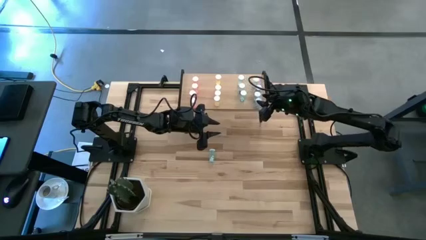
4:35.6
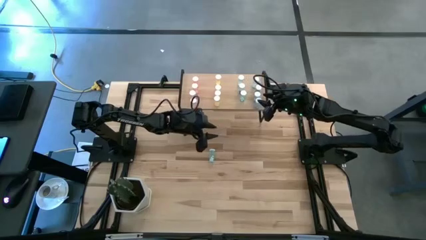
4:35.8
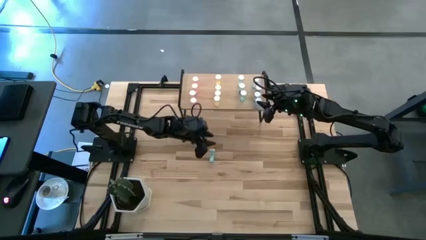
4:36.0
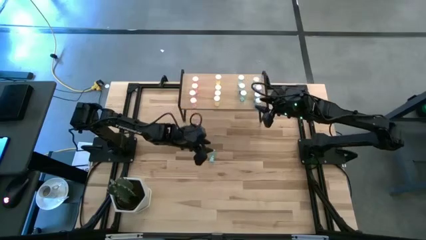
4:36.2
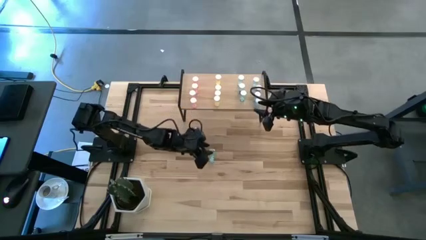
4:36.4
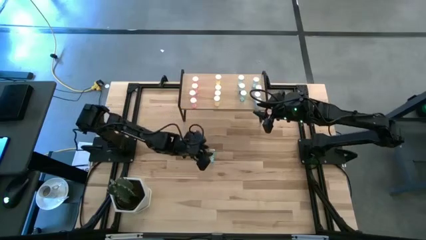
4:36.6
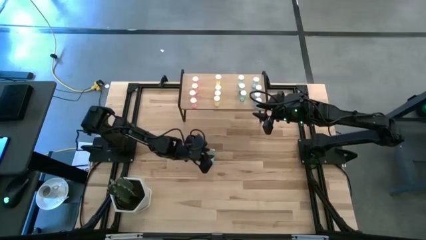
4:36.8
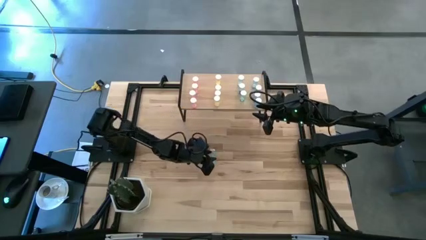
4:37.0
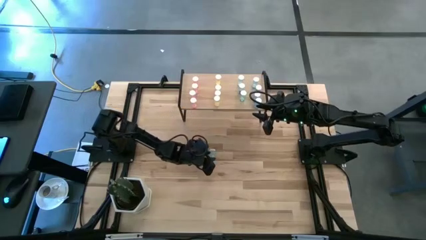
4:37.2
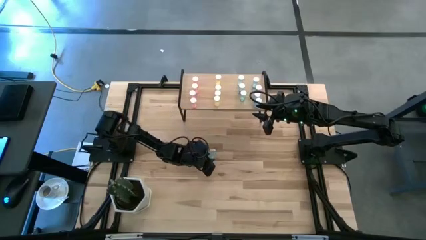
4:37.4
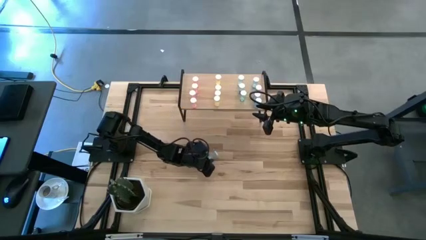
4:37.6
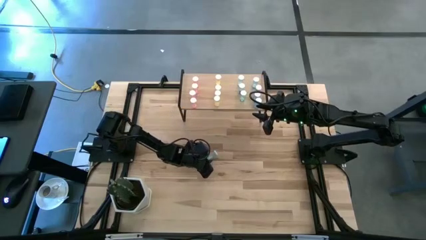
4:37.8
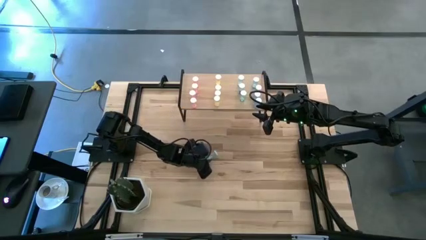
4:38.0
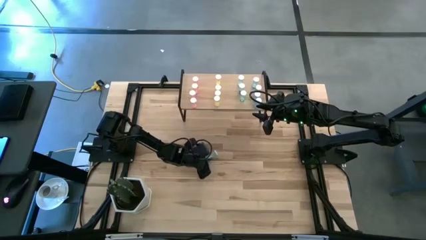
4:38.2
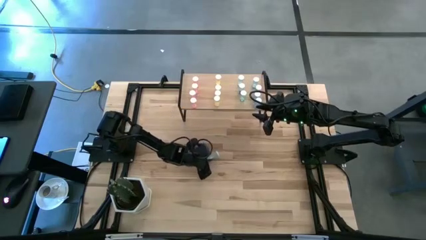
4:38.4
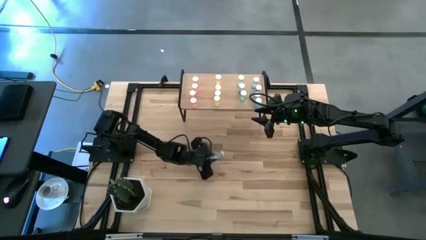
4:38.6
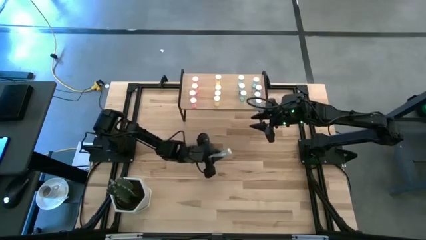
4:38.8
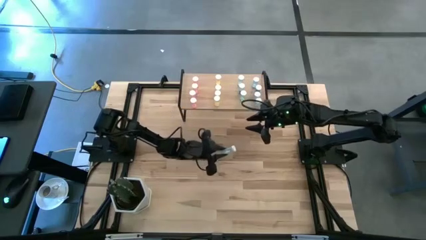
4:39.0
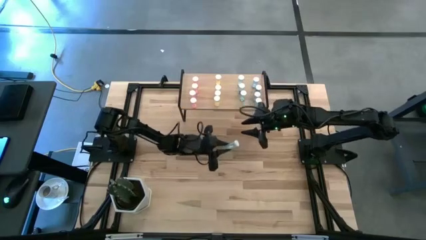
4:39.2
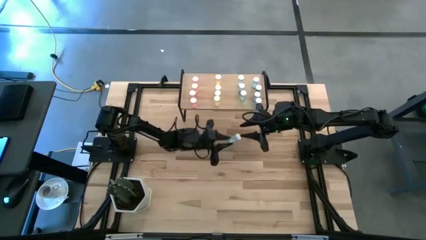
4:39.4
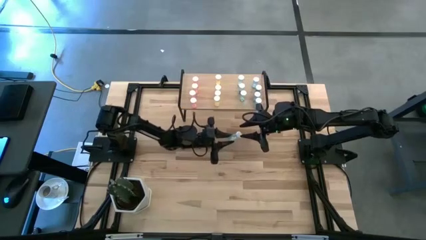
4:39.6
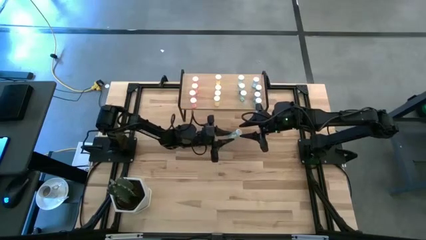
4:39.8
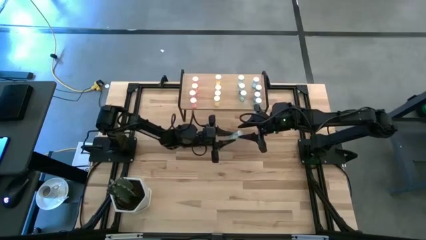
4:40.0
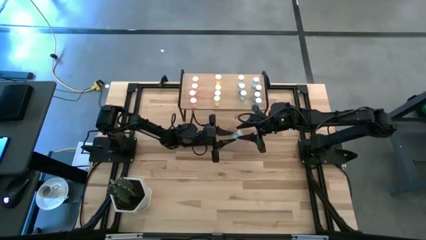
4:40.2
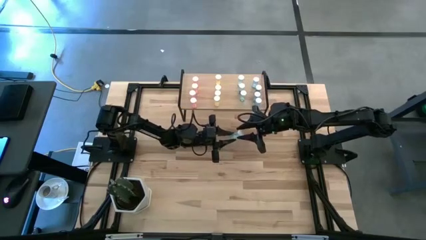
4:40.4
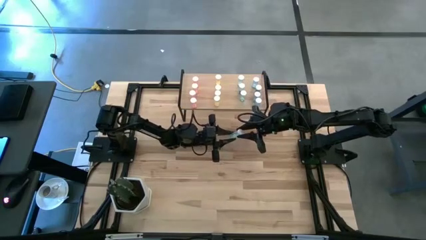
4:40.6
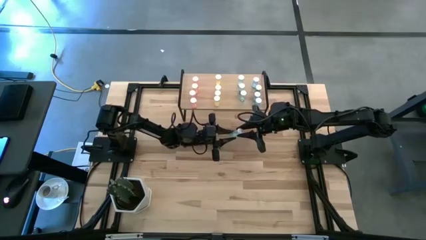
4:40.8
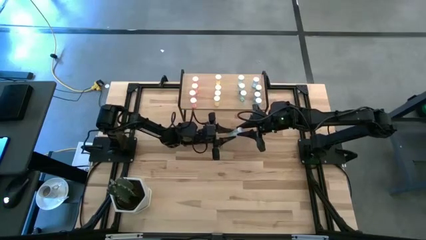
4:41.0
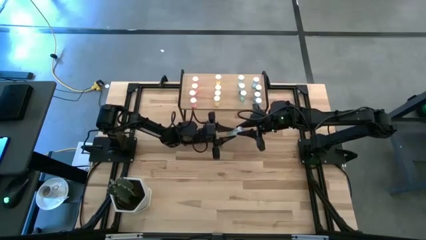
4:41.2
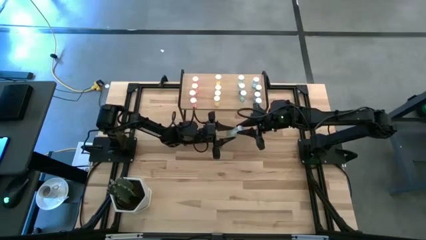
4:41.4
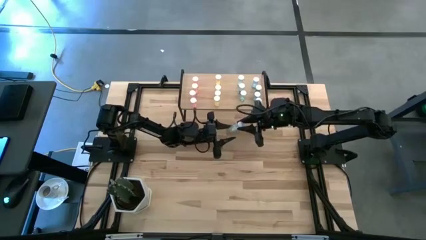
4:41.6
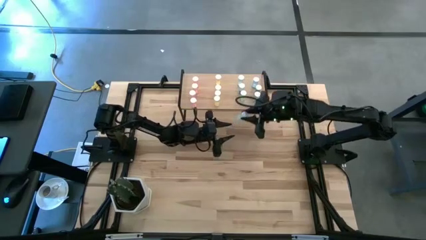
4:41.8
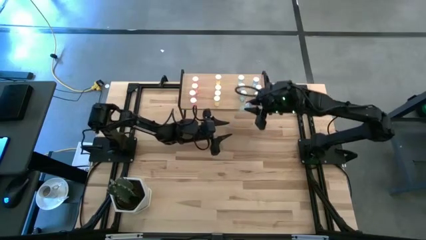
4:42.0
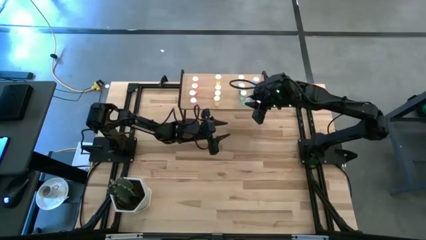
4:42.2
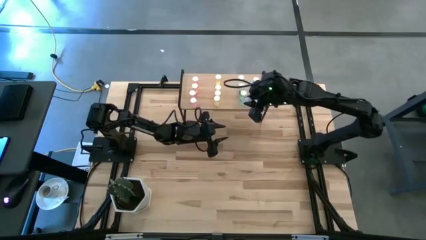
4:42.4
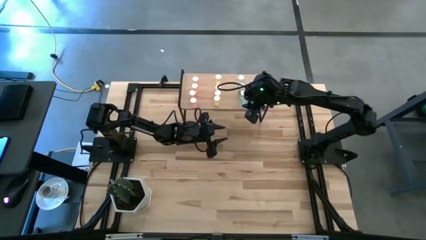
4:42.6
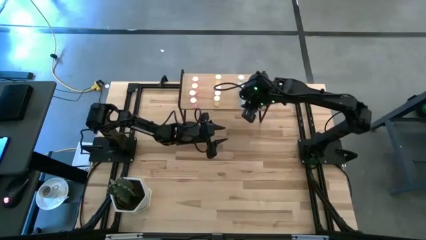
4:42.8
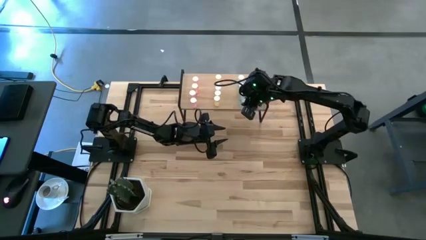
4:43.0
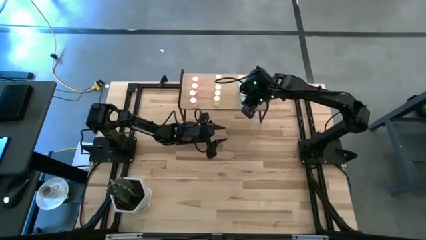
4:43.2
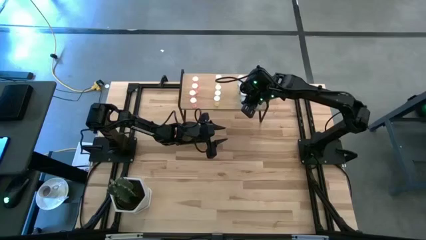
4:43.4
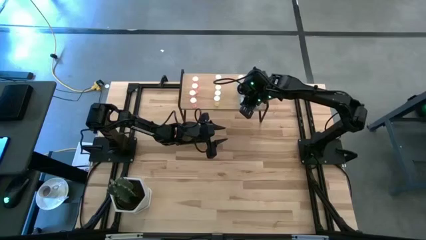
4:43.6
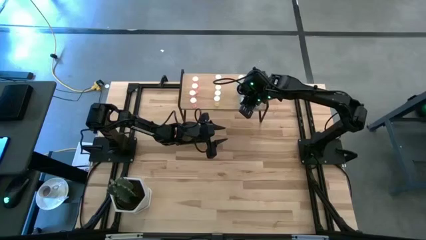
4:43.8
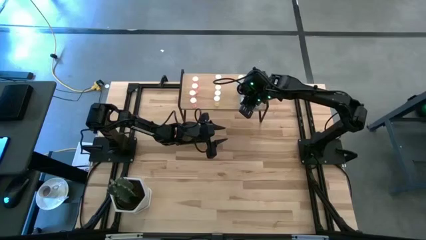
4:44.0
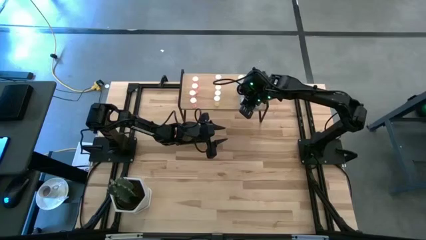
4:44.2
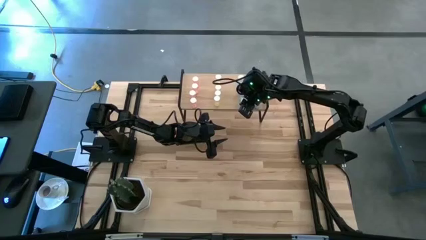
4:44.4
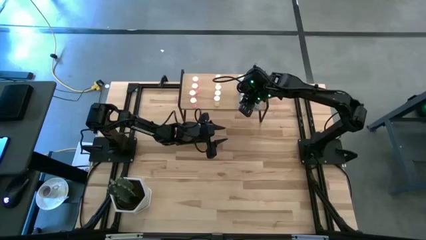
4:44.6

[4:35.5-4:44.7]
Task: Pick and place medicine bottles onto shelf by color
Put the light blue pill bottle on the shelf aligned with the other light blue pill bottles

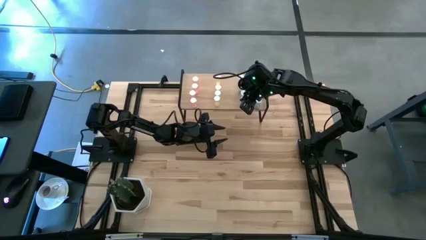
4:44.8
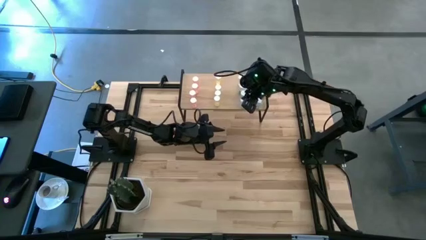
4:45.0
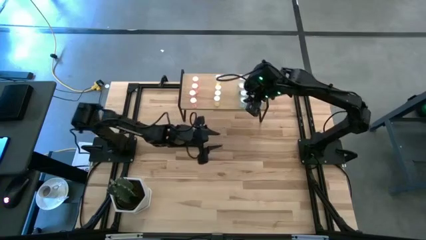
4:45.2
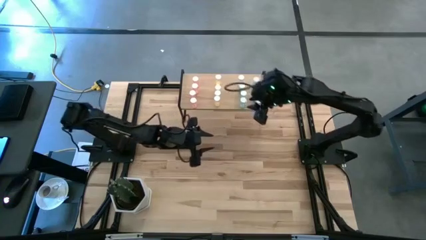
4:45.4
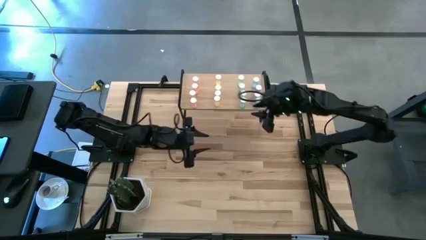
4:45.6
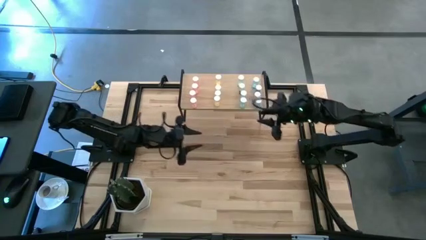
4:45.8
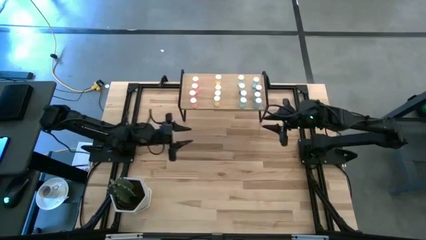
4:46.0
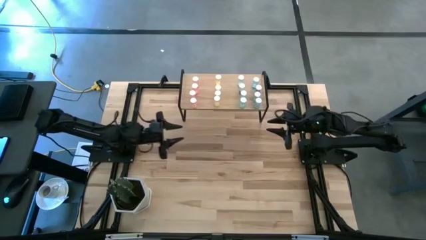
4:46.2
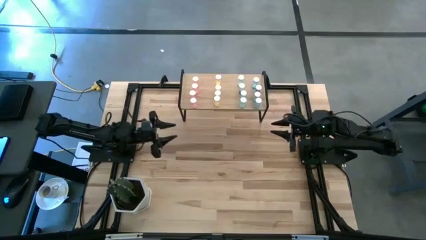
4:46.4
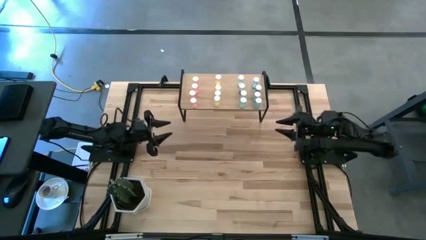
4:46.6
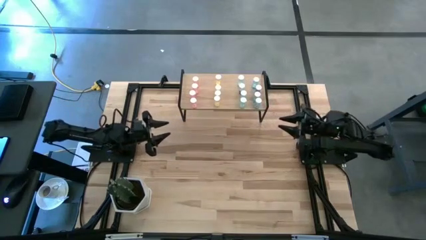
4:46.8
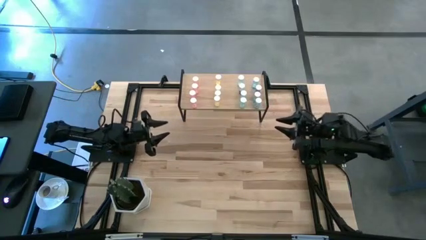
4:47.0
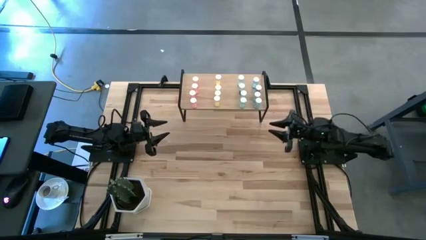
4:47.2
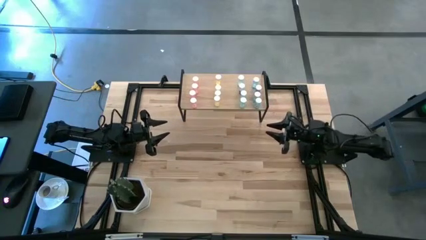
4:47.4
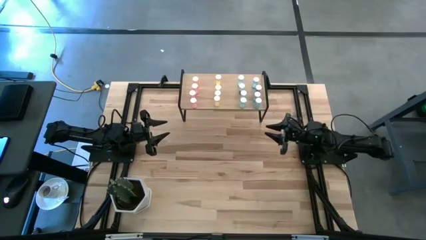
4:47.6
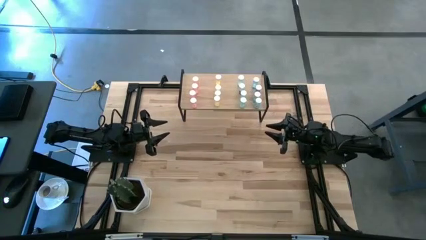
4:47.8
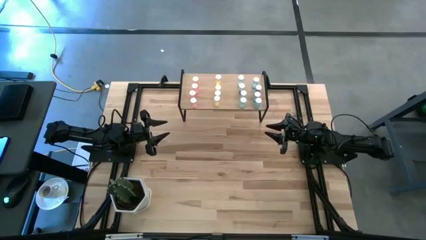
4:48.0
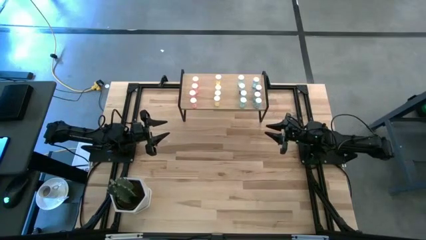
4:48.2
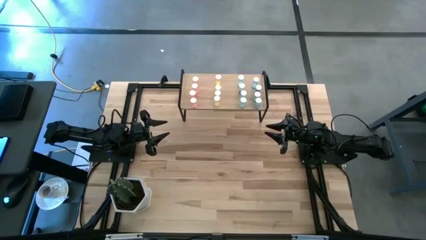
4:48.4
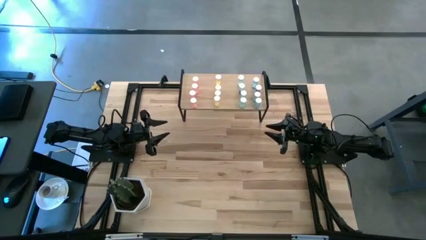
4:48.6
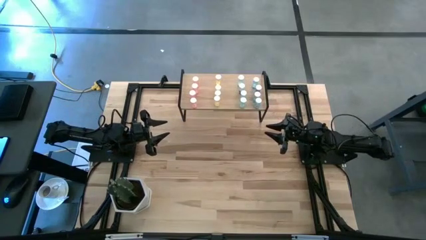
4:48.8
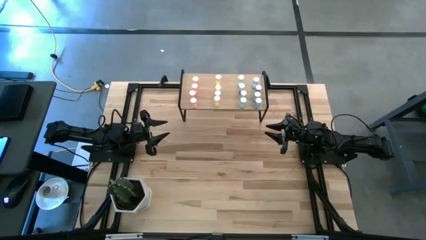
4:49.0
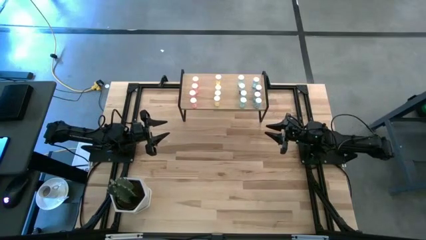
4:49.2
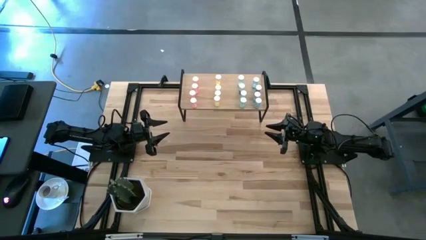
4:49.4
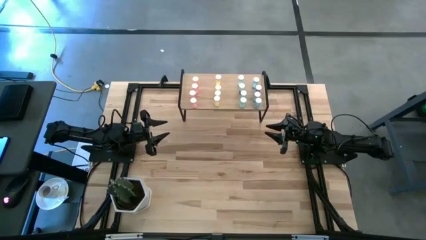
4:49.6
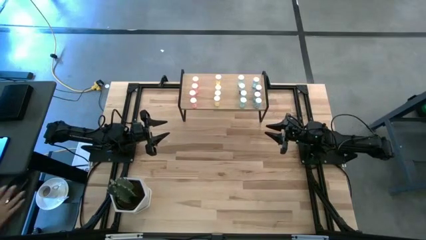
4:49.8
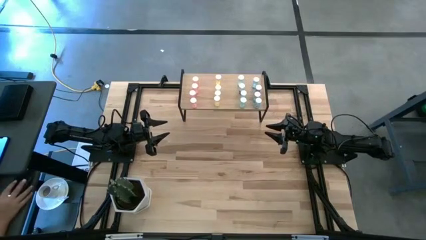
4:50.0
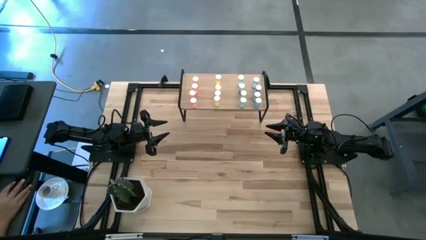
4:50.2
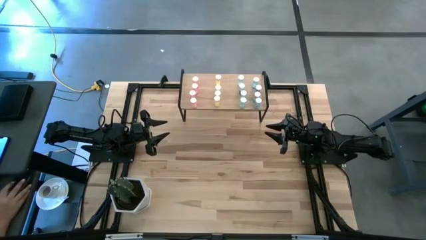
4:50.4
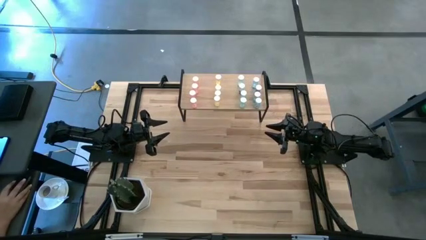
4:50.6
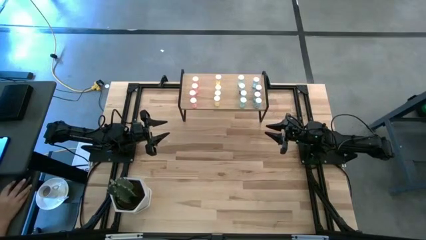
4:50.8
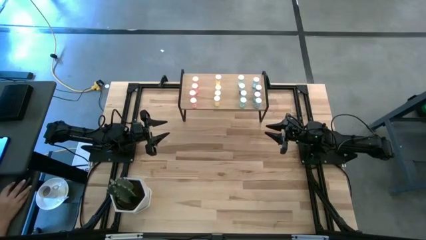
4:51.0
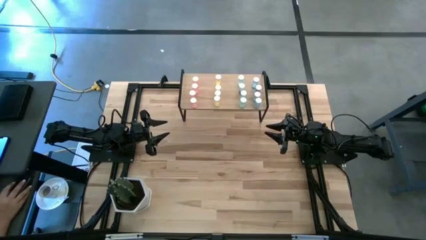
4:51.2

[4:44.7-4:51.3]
Return to Home Position
